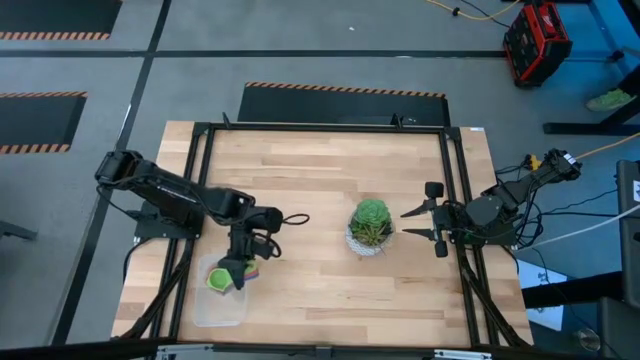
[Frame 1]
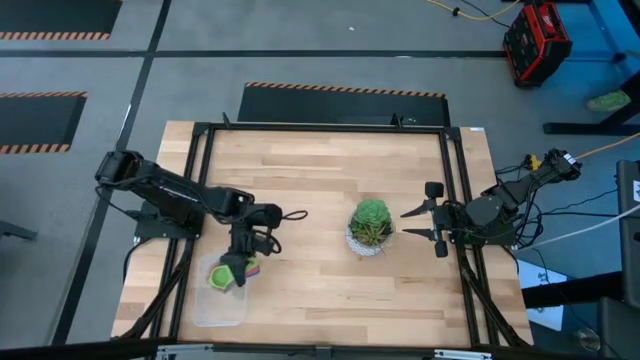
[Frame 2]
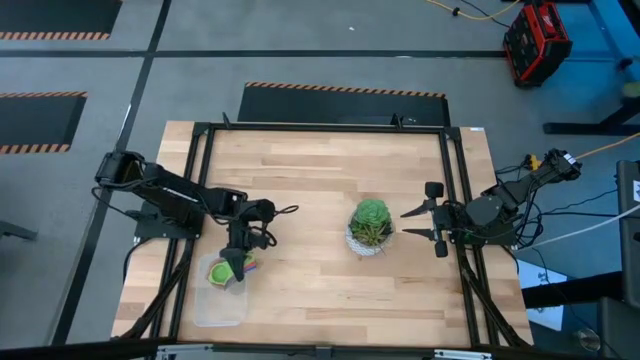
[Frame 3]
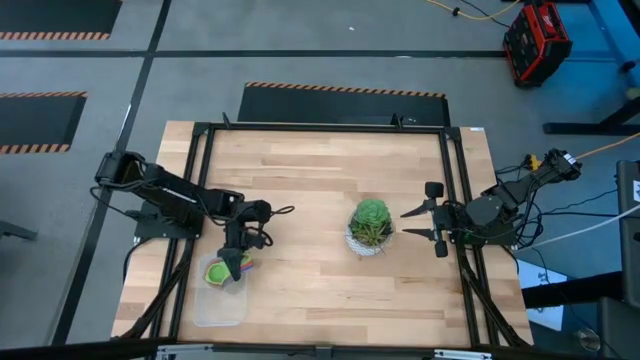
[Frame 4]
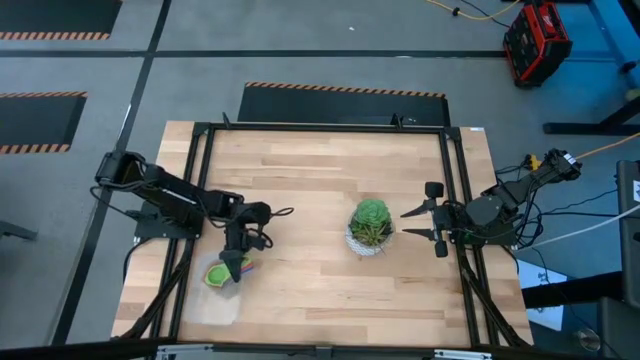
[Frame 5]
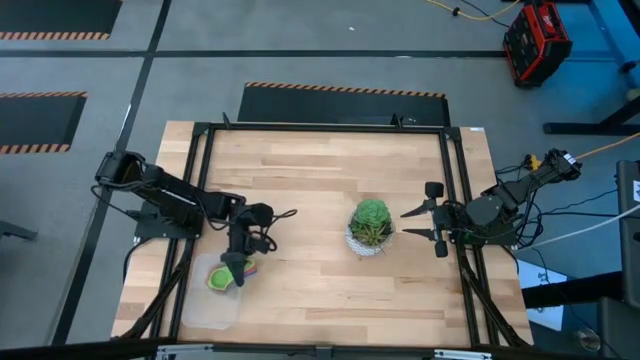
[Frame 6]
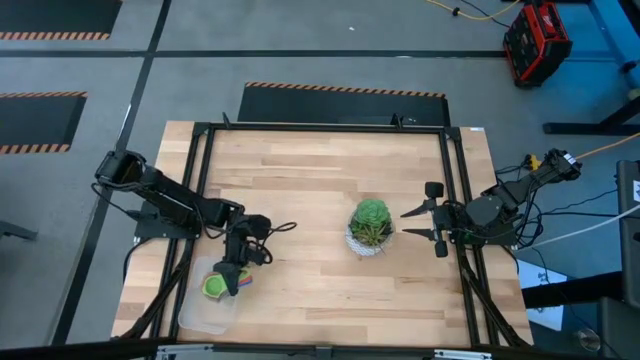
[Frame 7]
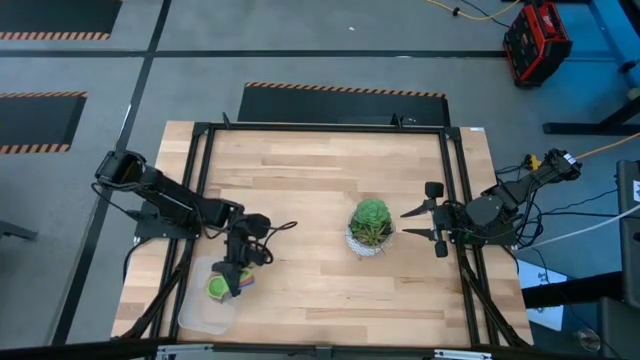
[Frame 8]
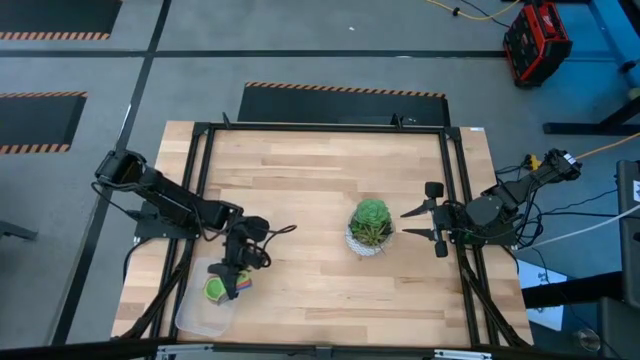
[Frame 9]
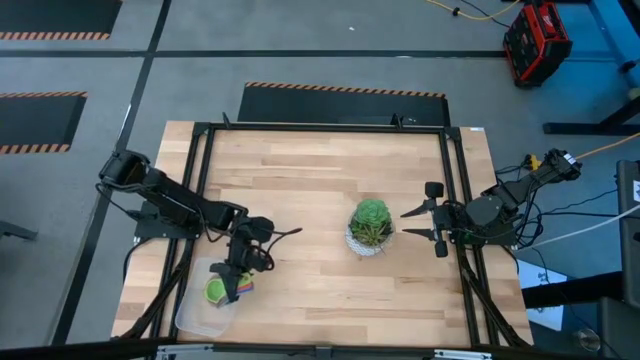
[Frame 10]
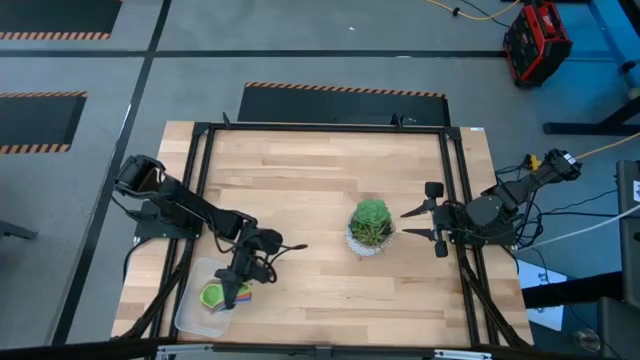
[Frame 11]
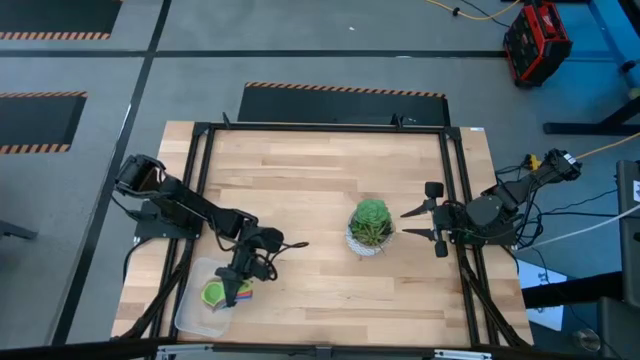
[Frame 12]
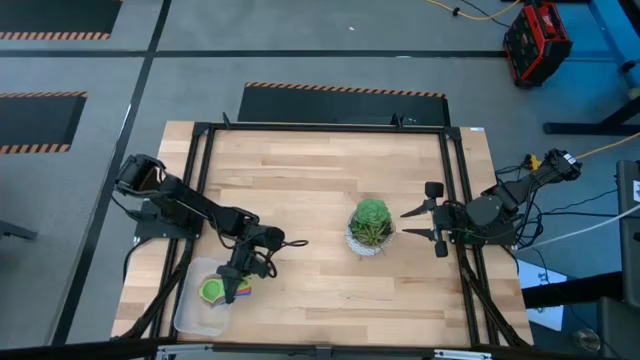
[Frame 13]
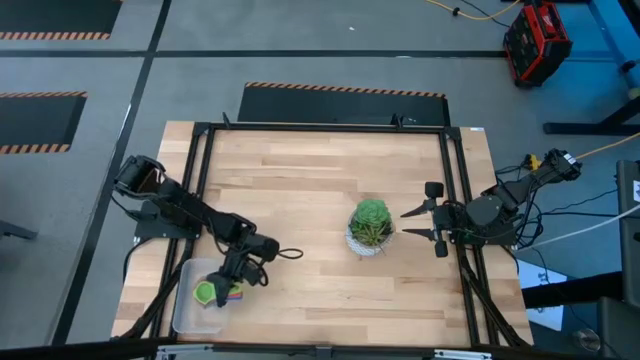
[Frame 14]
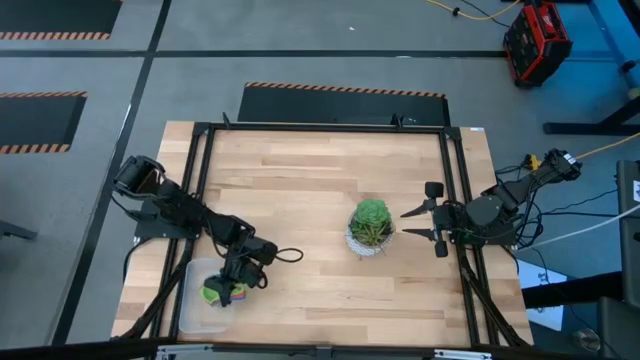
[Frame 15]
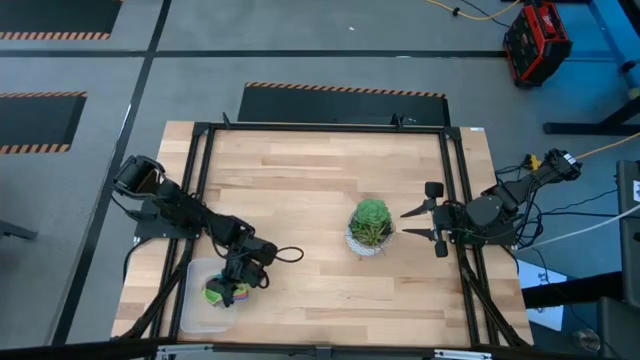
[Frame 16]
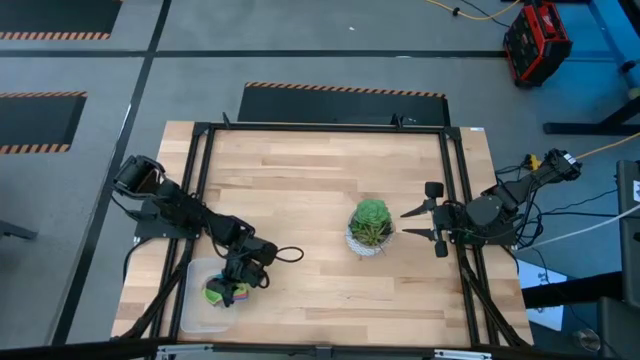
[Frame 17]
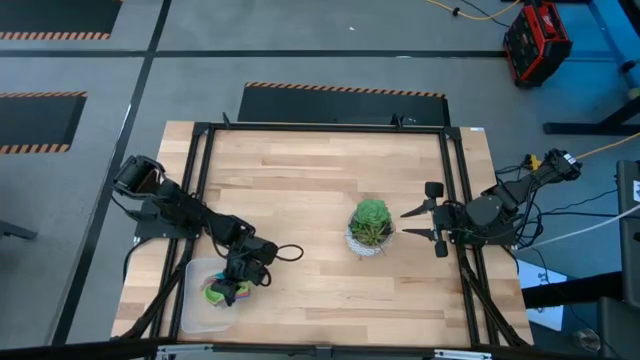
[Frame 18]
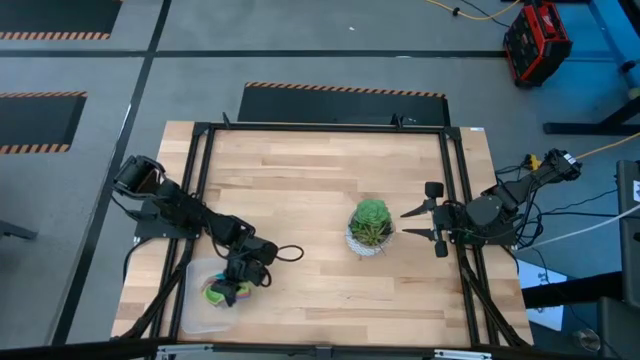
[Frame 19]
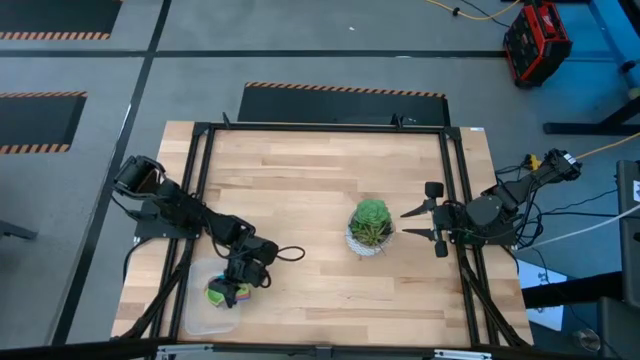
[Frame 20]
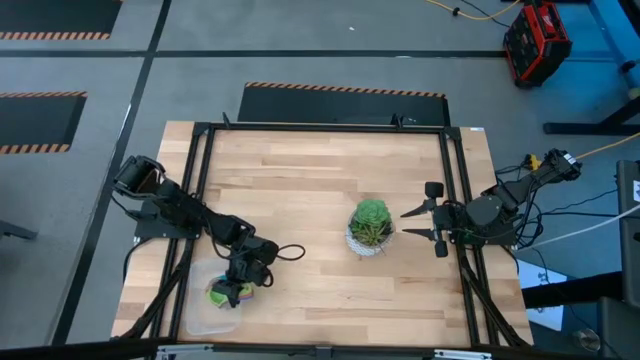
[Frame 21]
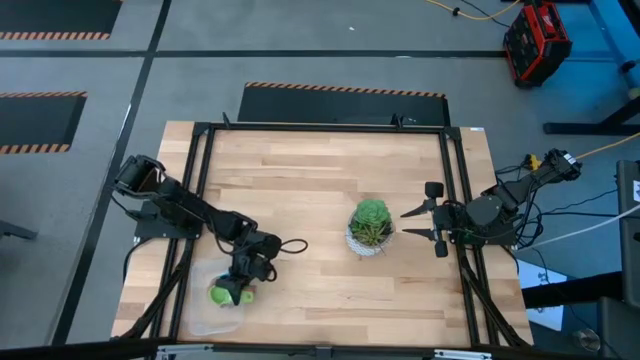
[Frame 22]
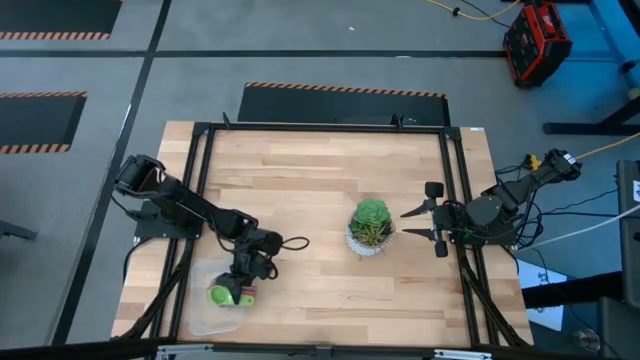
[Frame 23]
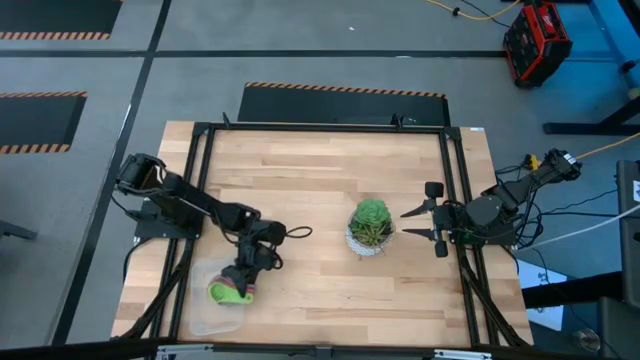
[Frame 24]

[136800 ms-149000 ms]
Task: Nest measuring cups in basket
Put the stacked measuring cup into the transparent bin

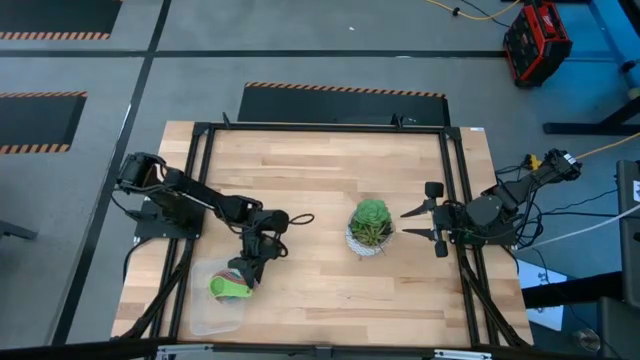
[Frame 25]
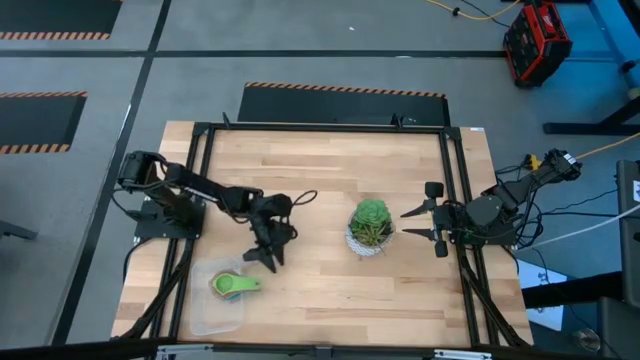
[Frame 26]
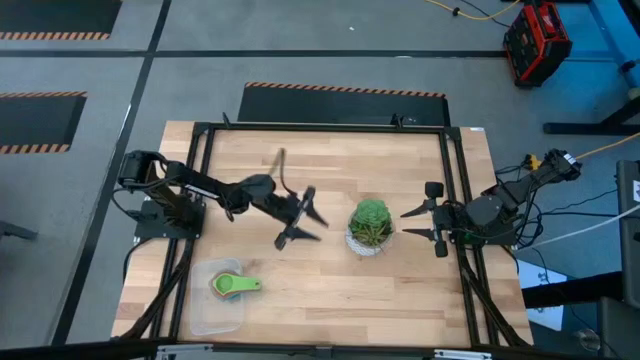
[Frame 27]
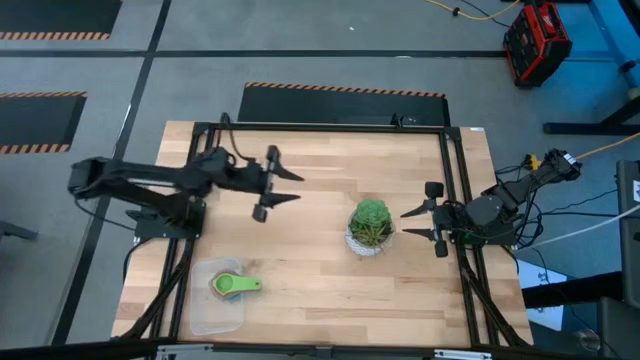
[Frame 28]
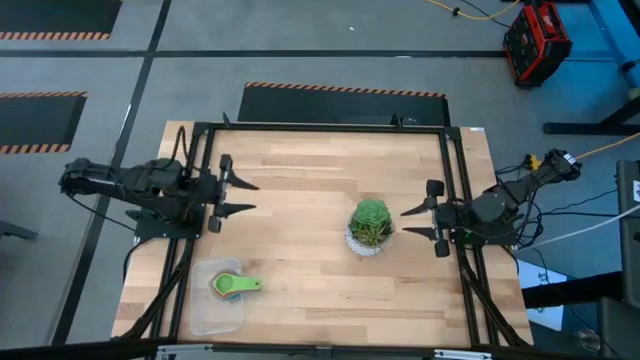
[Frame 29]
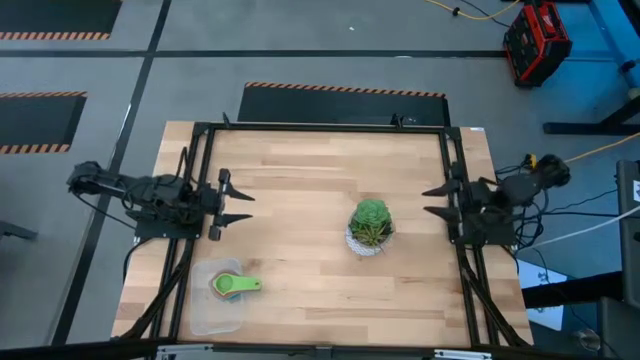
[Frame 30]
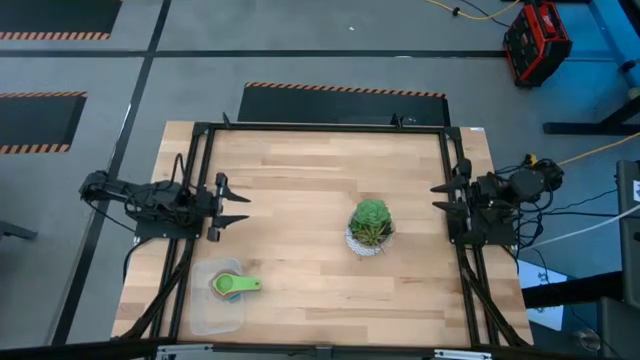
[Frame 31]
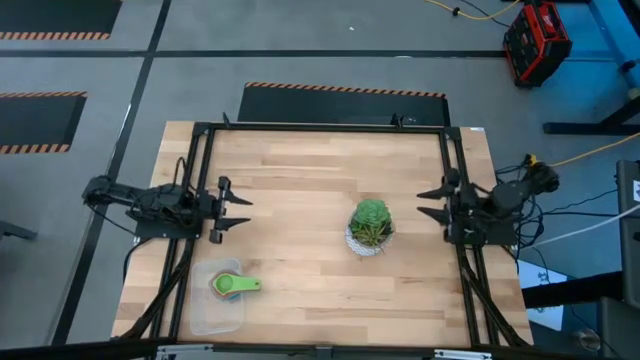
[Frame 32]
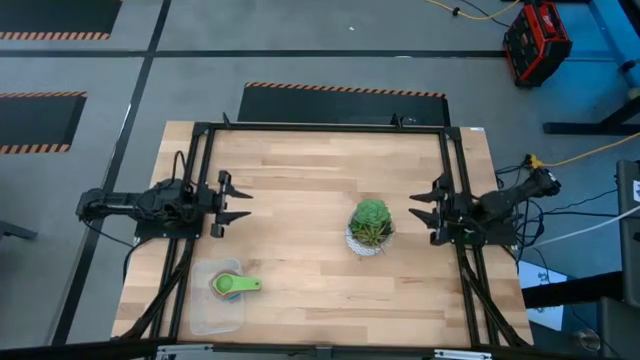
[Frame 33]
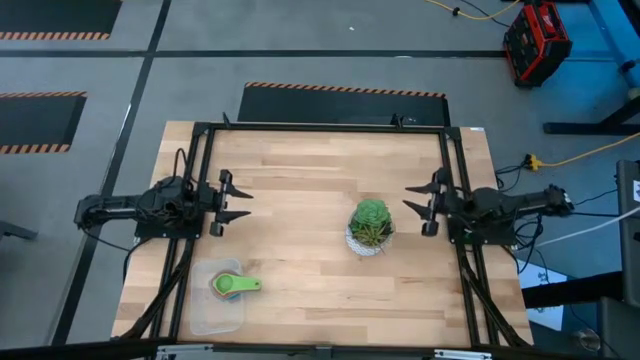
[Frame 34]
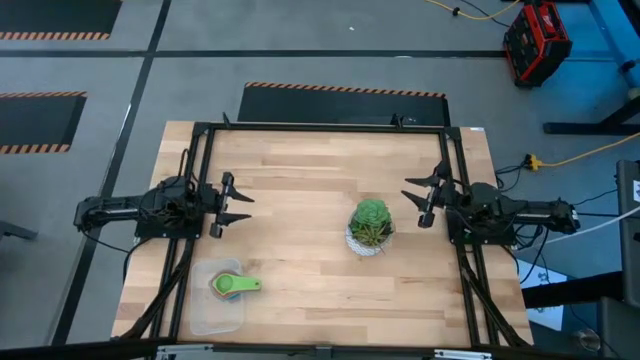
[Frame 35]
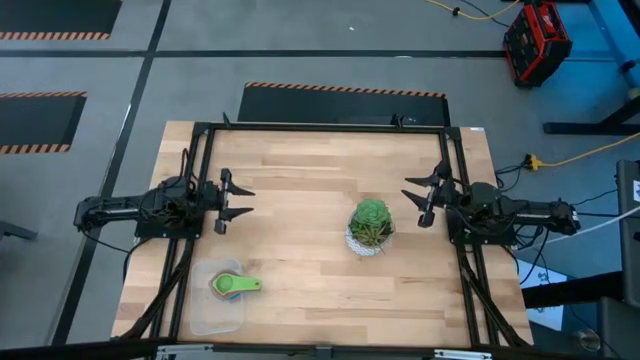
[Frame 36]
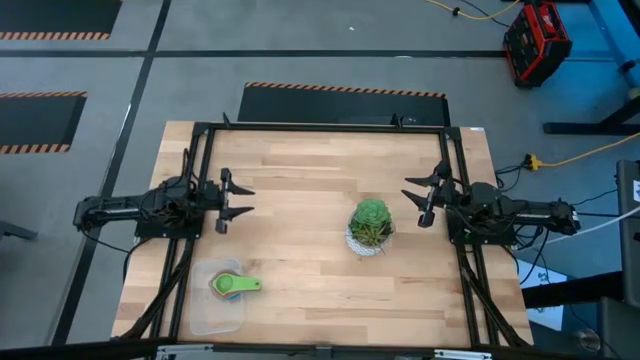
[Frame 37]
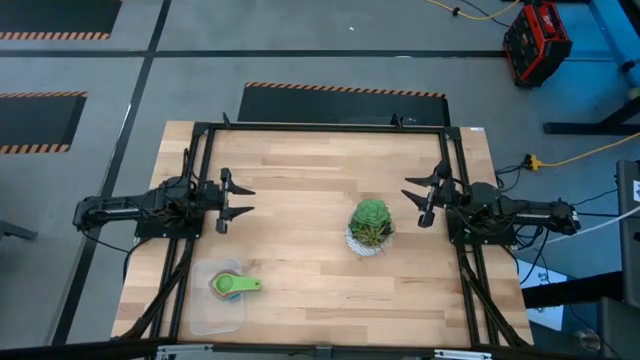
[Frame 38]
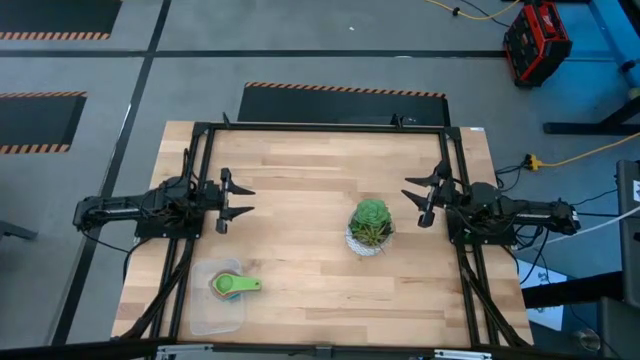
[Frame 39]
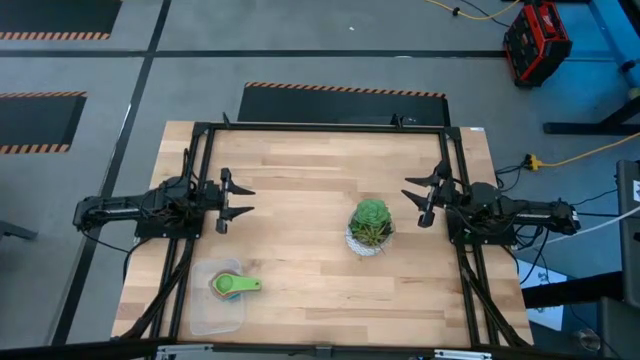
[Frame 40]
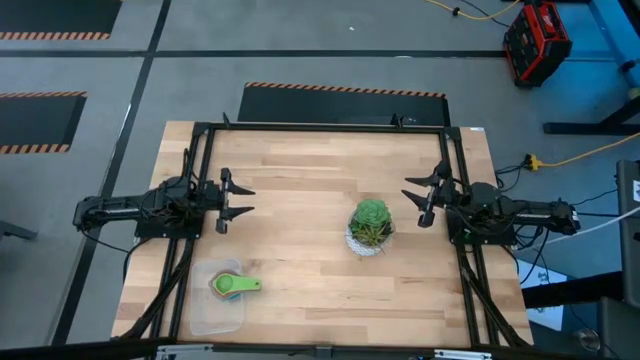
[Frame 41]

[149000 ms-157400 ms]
Return to Home Position

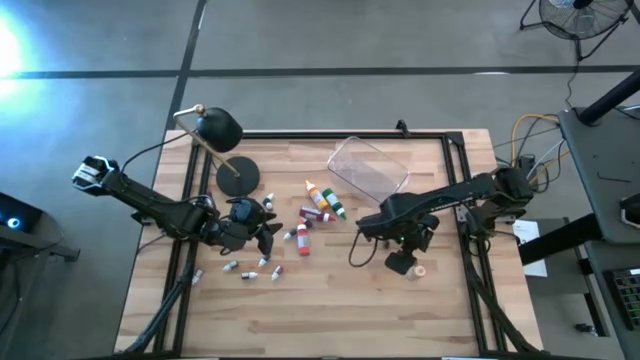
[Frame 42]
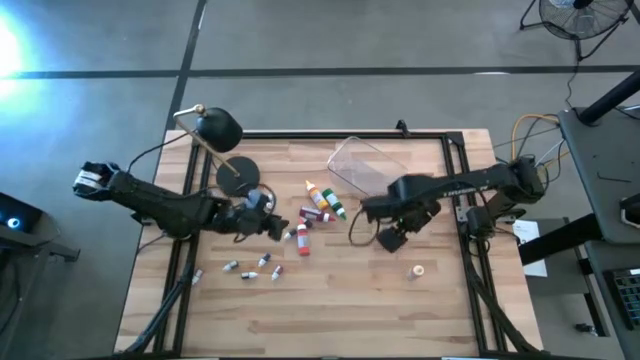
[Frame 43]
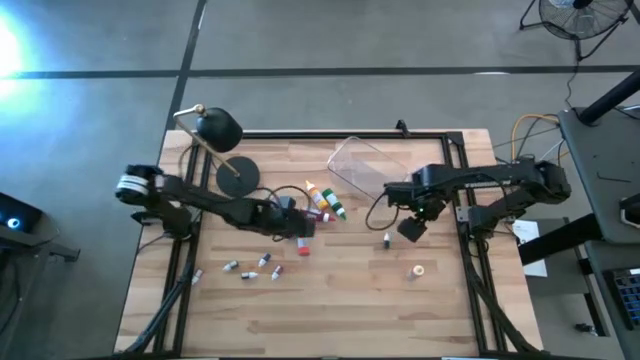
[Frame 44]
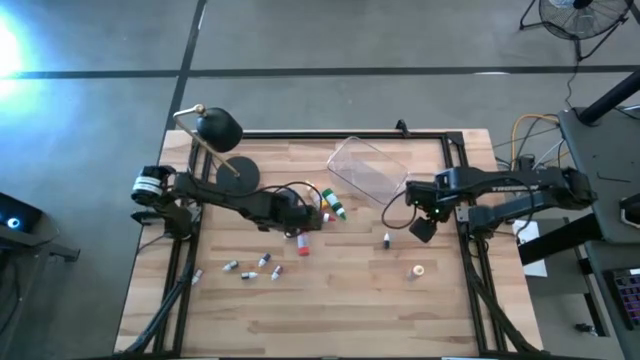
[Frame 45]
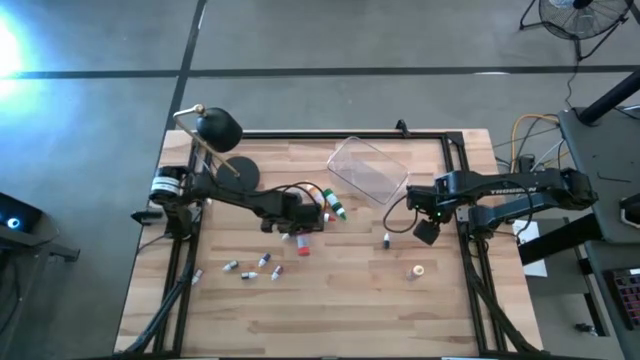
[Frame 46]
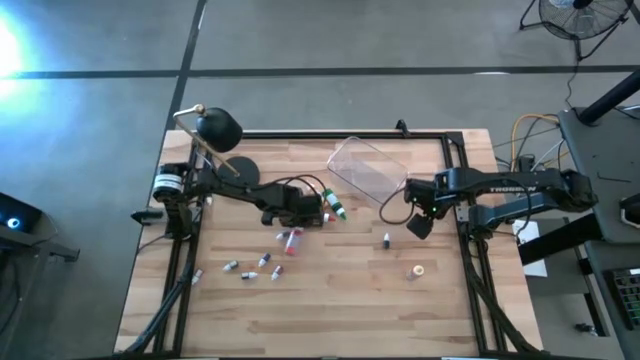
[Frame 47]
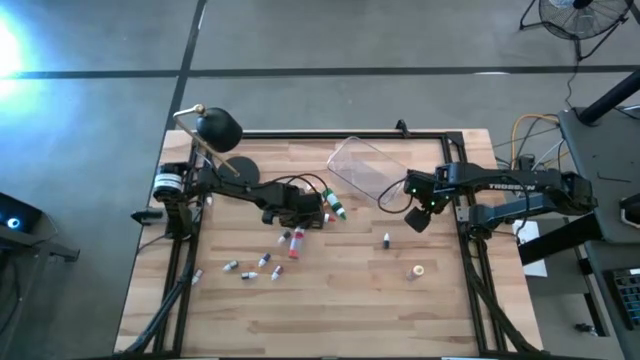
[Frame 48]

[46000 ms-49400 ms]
Task: Pick & Place food coloring
Adjust the large orange food coloring bottle
